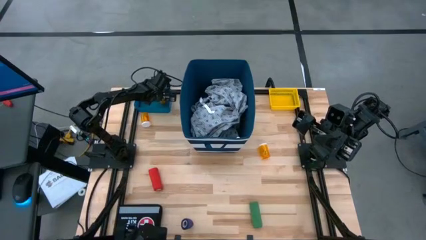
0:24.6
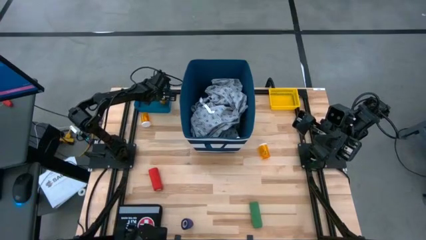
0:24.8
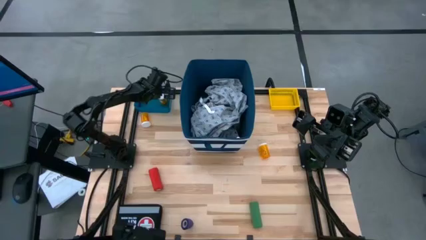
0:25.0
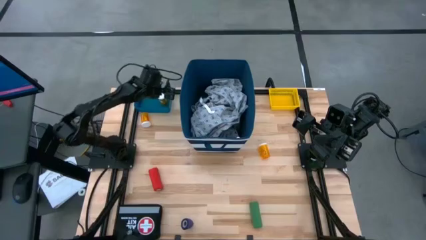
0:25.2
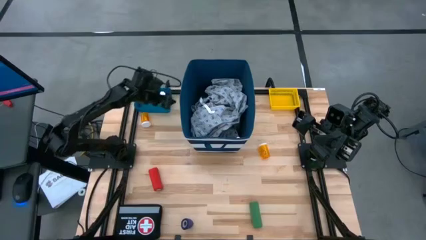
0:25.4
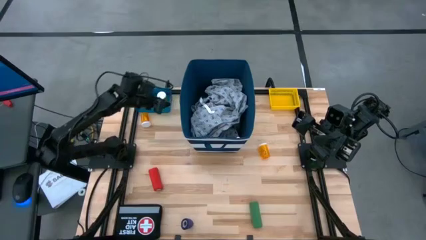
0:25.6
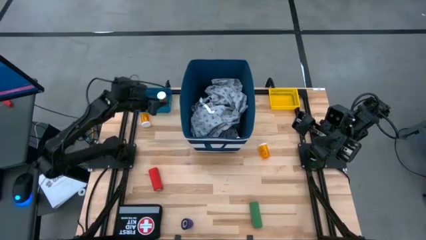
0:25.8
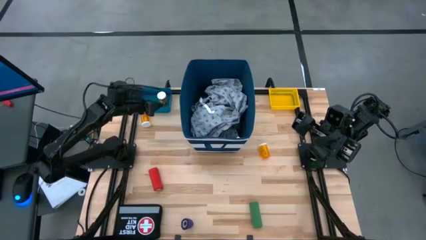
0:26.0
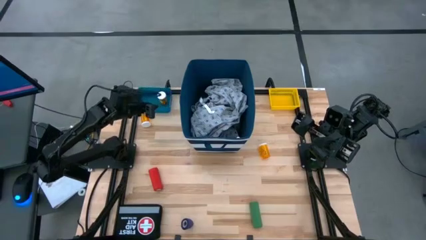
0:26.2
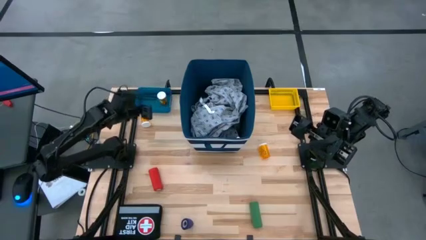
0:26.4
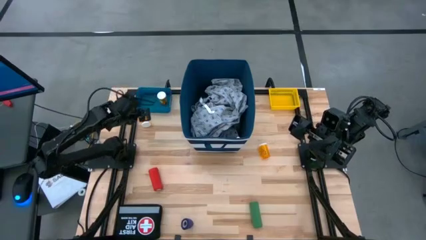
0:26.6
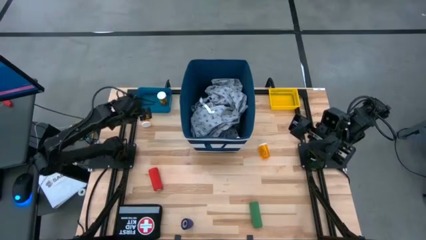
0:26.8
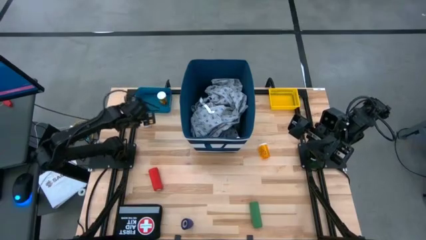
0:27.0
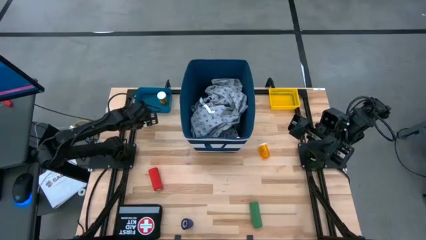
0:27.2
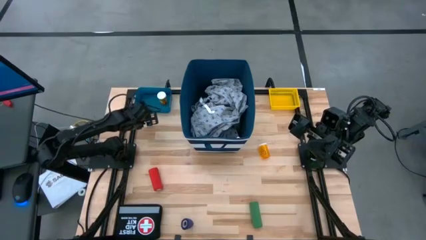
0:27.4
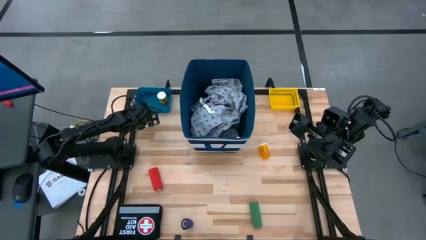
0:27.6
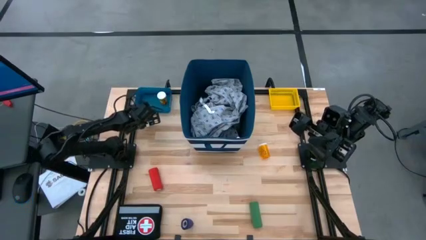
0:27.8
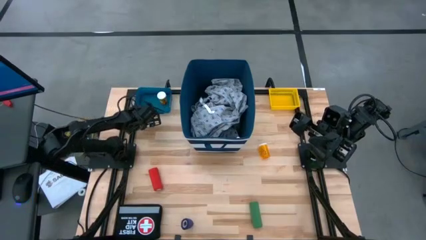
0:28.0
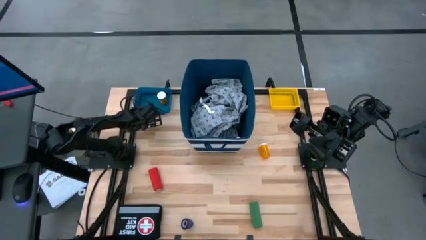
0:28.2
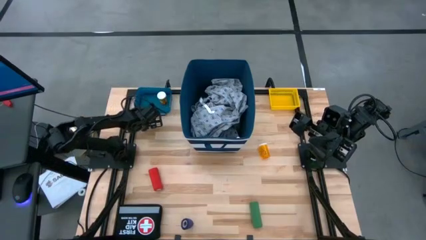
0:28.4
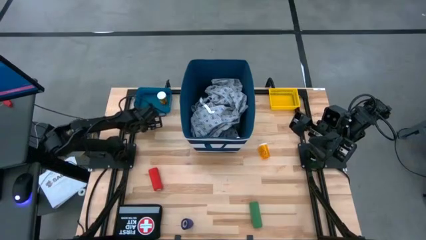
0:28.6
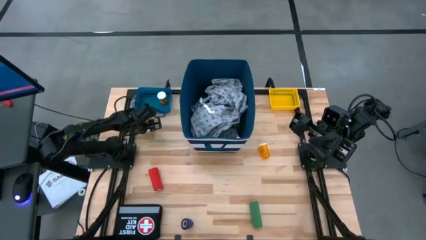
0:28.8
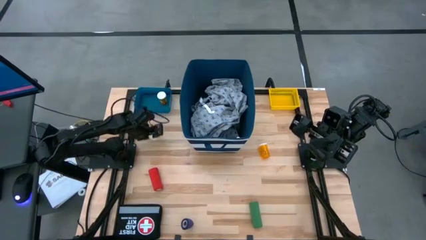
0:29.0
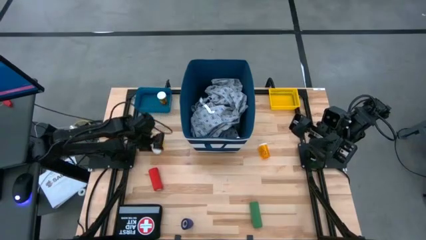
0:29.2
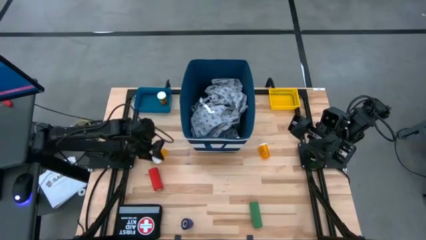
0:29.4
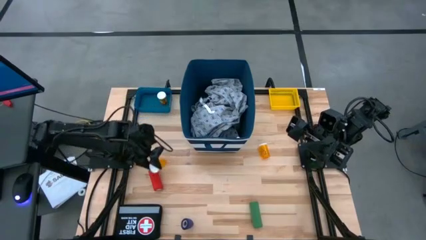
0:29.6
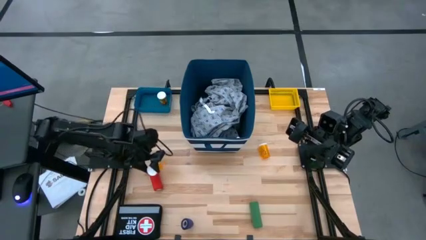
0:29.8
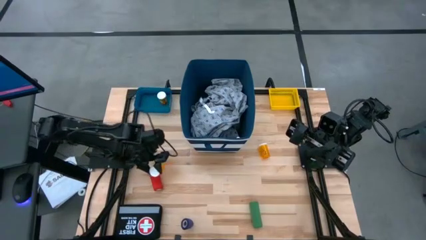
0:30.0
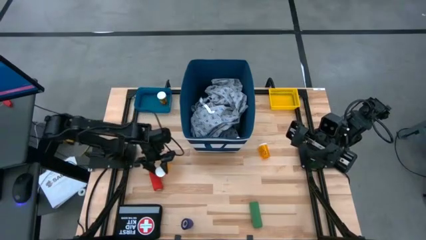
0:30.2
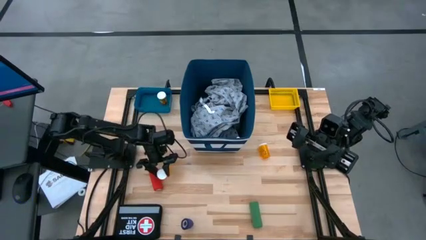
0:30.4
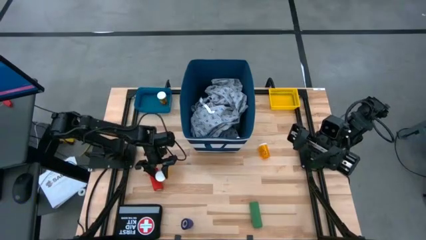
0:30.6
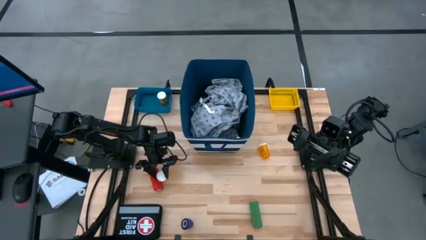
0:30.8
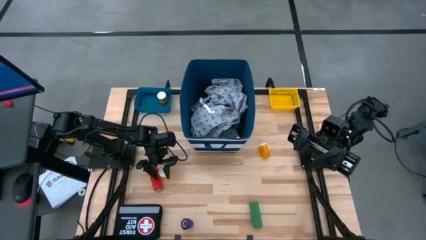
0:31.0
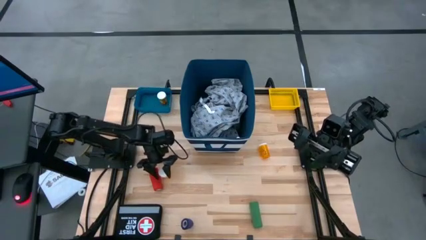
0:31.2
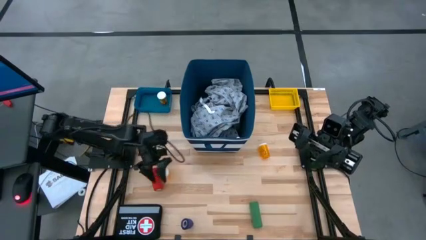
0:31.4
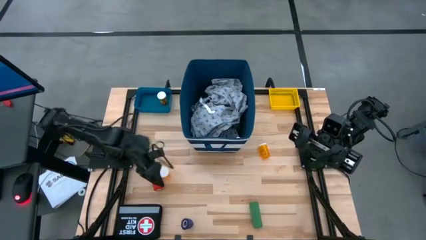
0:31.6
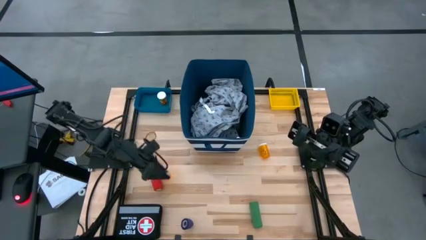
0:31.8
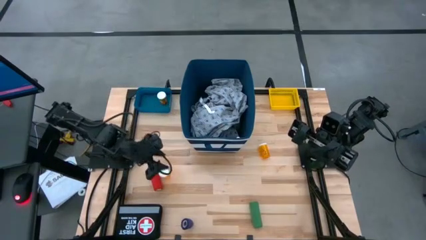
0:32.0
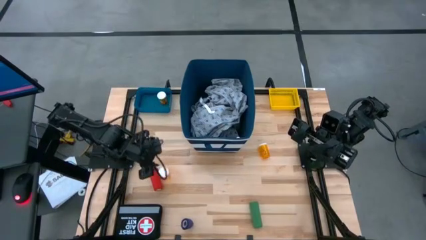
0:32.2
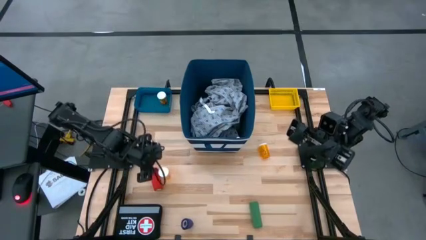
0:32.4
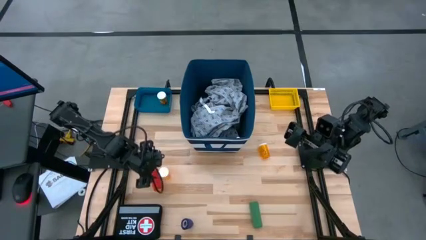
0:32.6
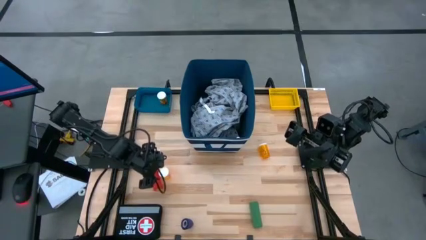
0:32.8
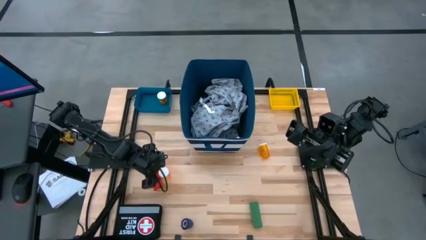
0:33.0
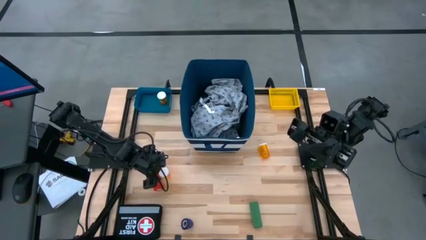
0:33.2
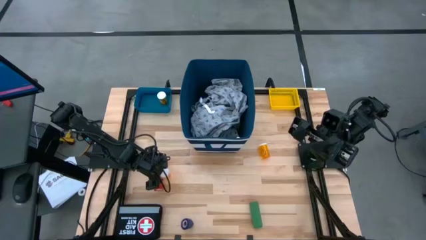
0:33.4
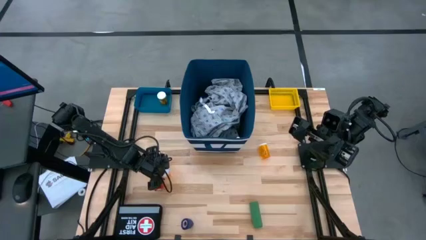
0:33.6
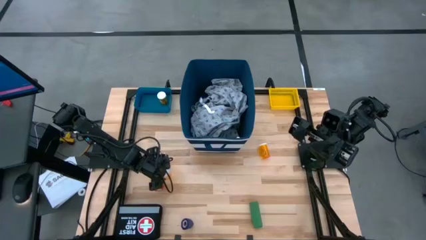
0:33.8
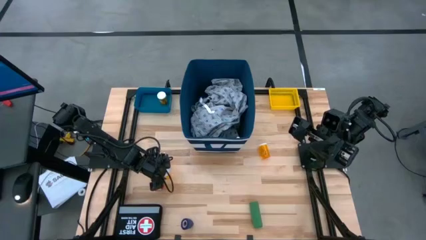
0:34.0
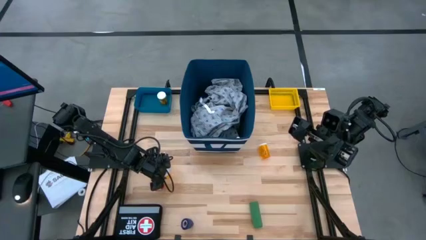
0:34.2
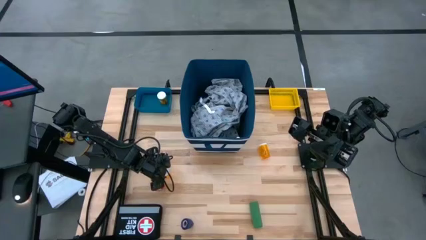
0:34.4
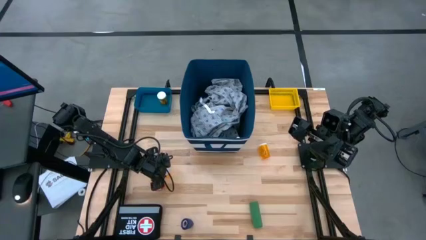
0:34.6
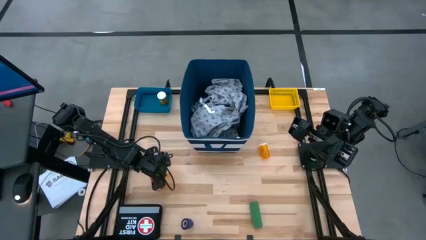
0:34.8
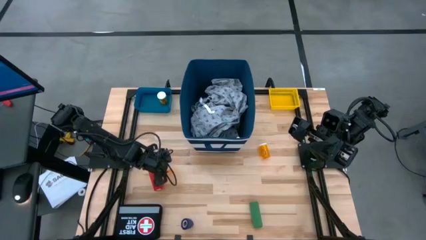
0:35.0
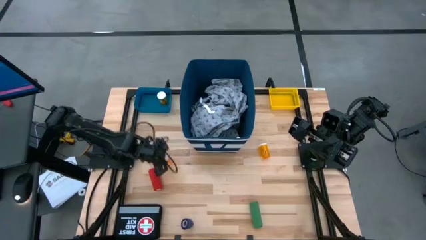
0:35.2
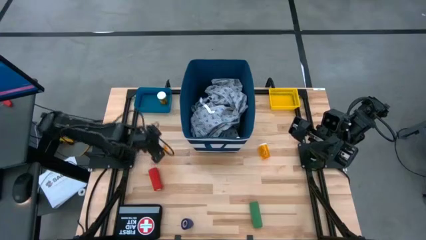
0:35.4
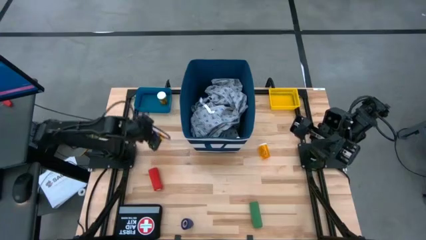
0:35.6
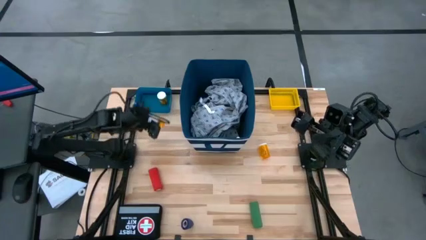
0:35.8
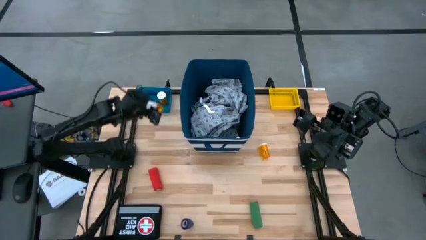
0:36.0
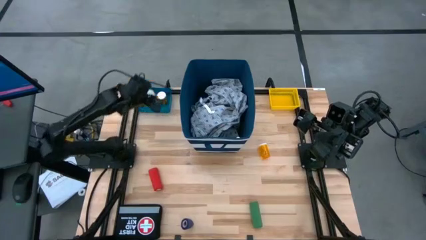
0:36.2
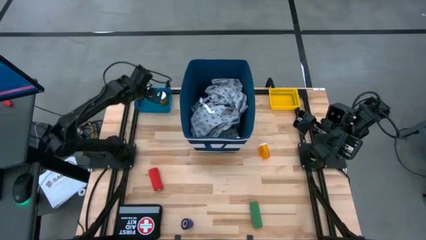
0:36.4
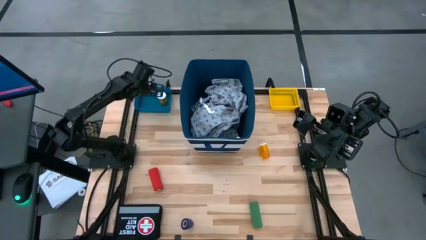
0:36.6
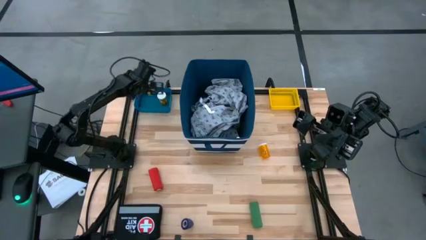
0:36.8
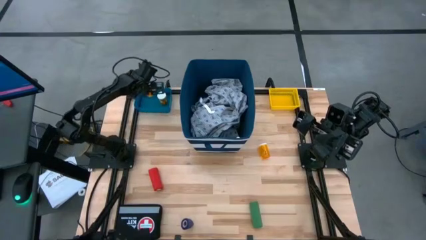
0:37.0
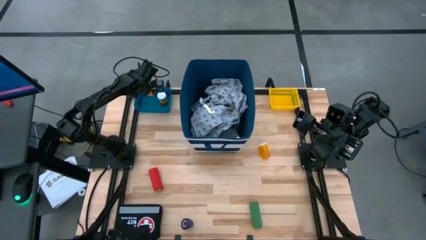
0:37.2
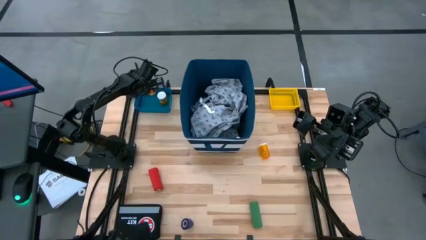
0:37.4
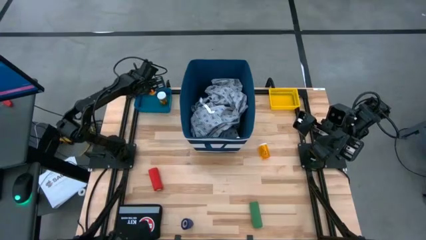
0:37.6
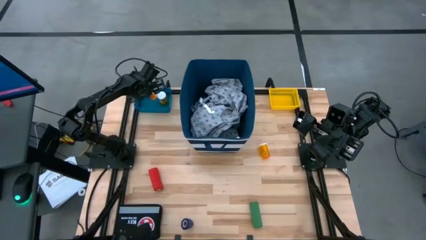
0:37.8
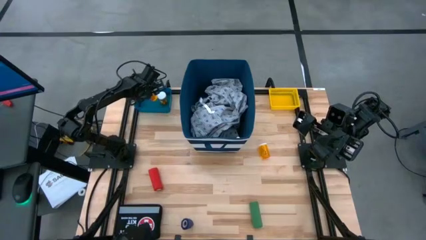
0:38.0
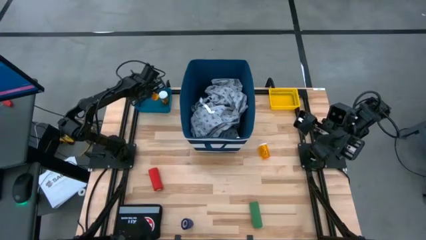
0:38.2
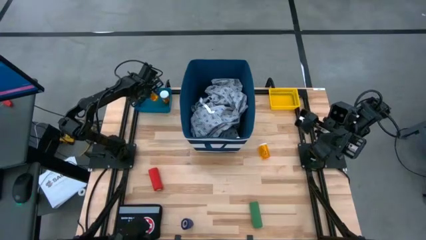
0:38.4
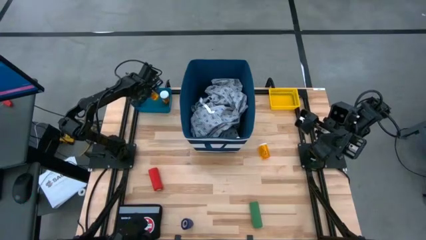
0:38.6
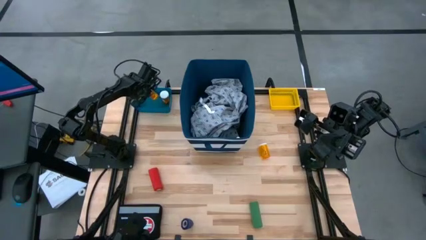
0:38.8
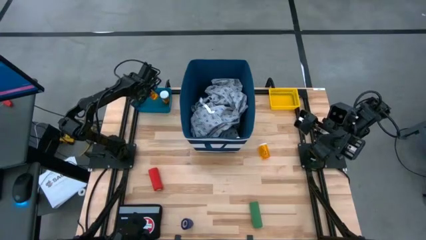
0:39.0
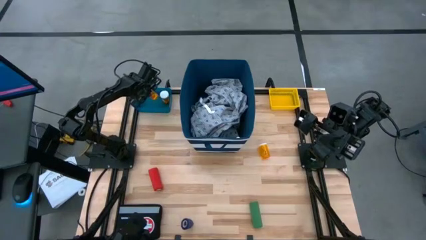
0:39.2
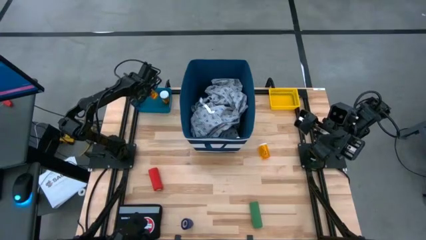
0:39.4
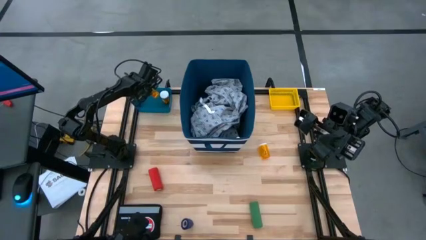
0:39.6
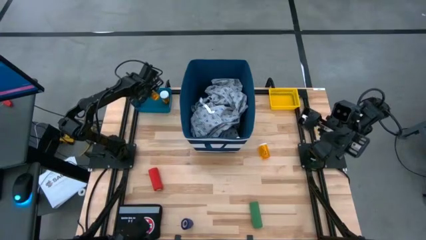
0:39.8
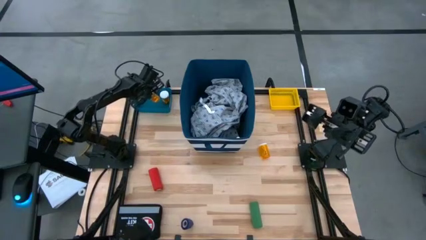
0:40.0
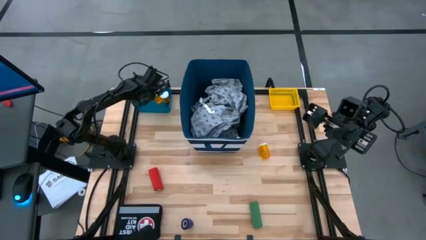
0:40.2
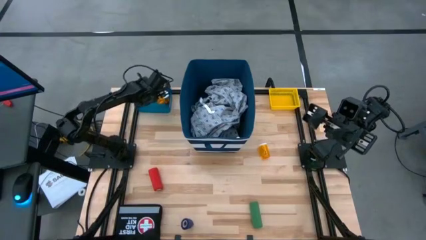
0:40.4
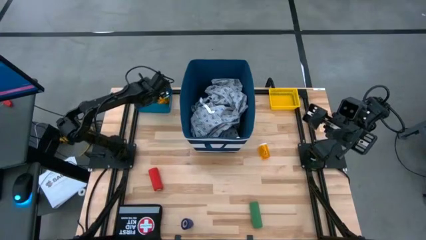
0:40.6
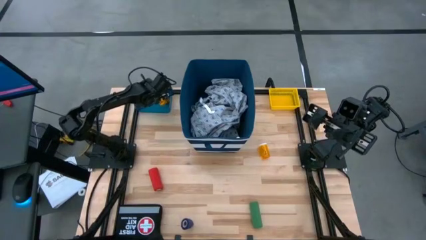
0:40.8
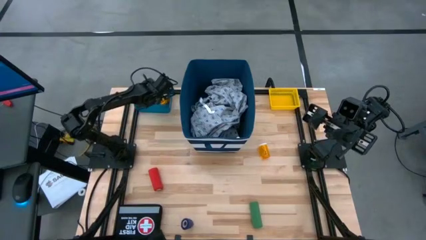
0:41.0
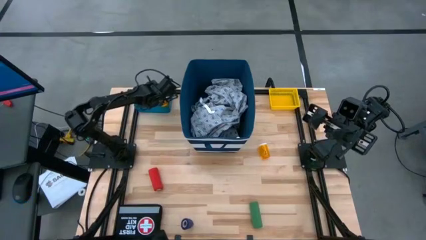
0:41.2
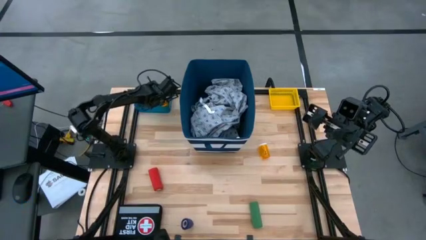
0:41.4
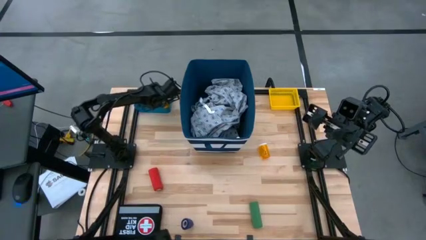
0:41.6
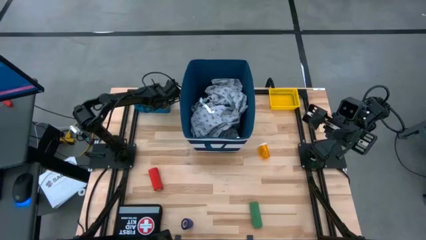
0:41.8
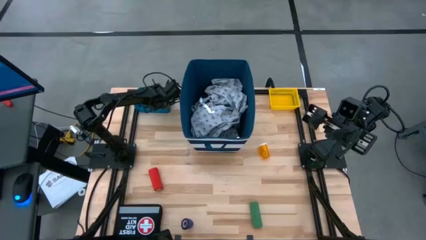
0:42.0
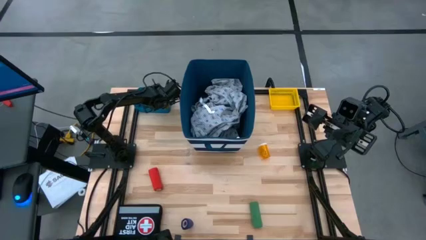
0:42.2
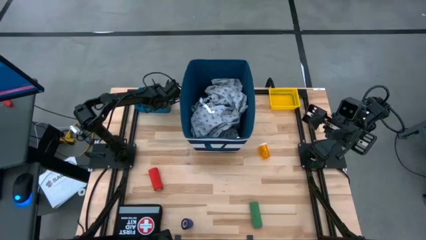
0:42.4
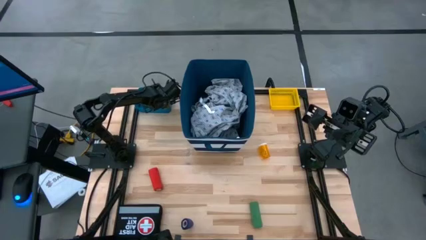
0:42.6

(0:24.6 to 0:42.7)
Task: Pick & place medical supplies in basket/bin
Put the left orange pill bottle into the blue bin
